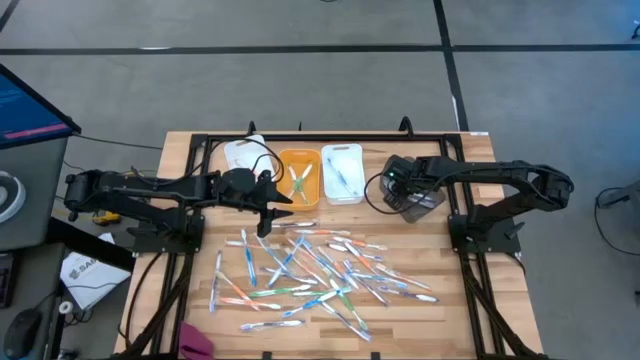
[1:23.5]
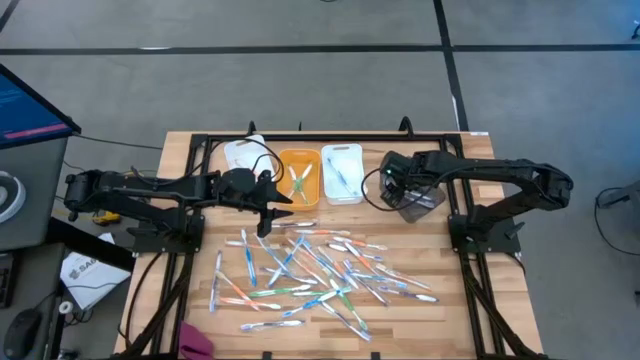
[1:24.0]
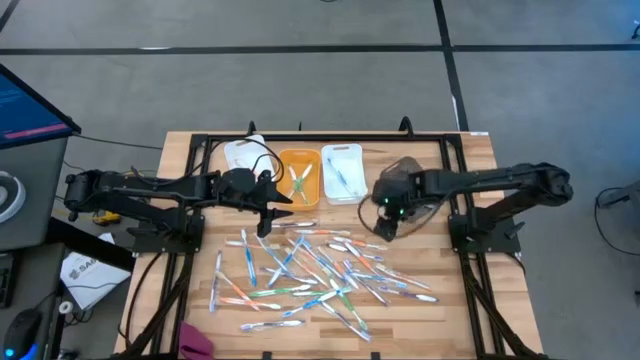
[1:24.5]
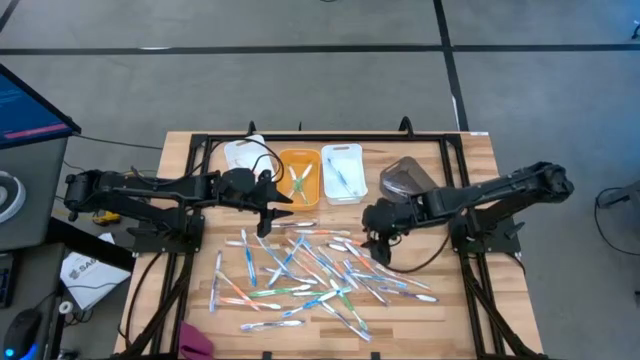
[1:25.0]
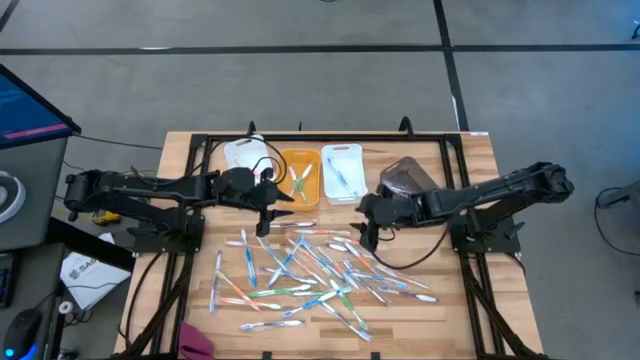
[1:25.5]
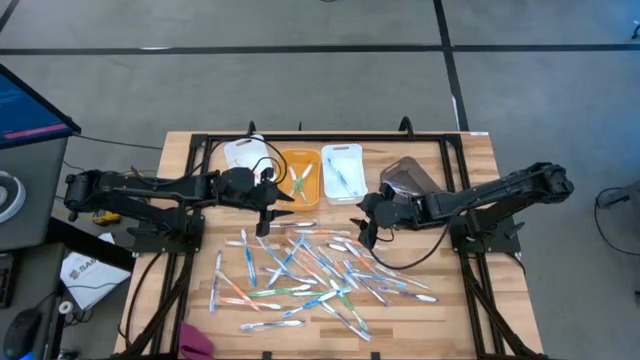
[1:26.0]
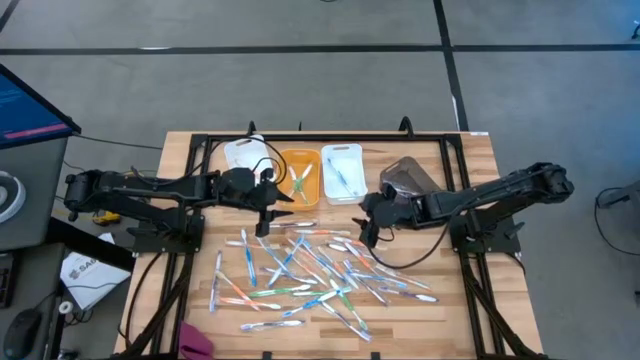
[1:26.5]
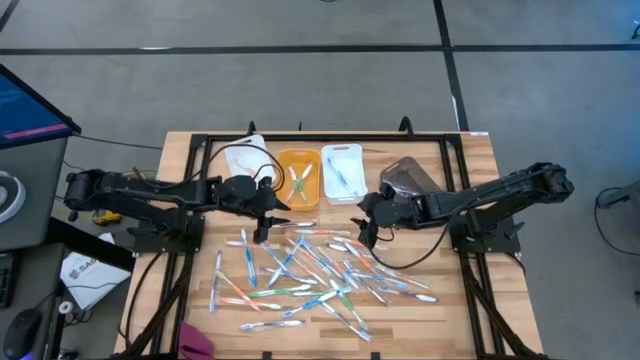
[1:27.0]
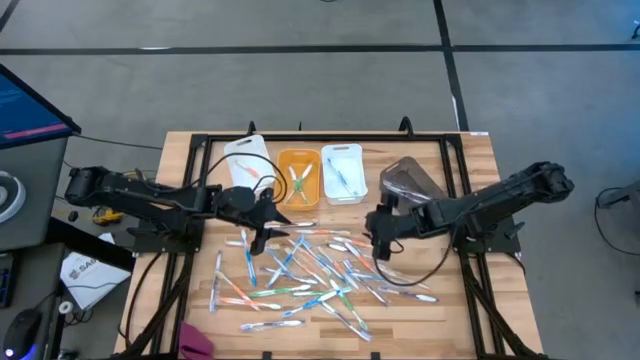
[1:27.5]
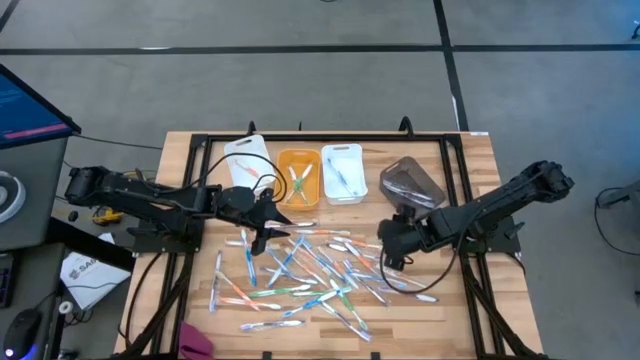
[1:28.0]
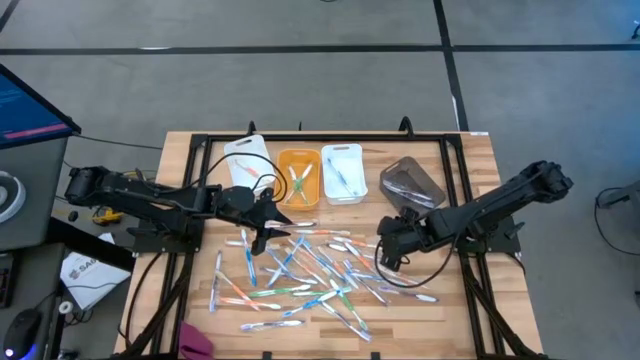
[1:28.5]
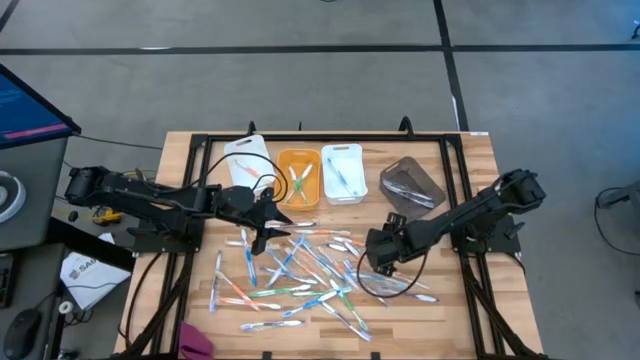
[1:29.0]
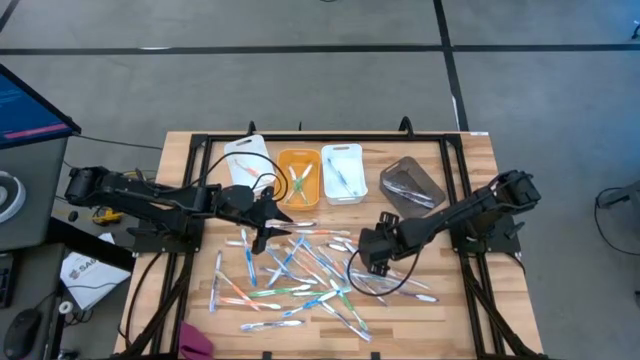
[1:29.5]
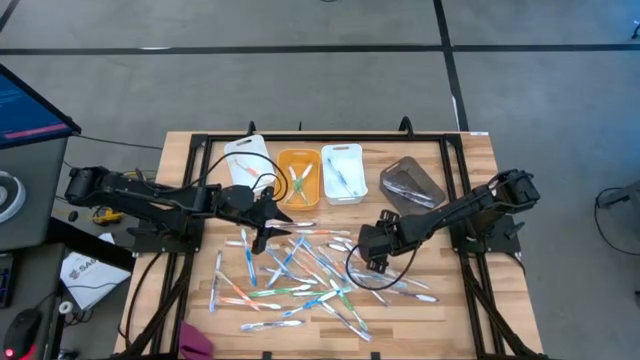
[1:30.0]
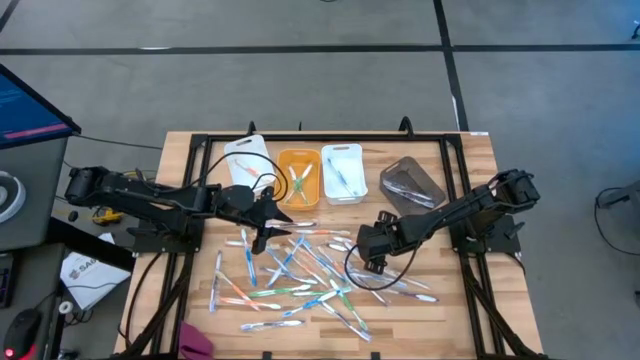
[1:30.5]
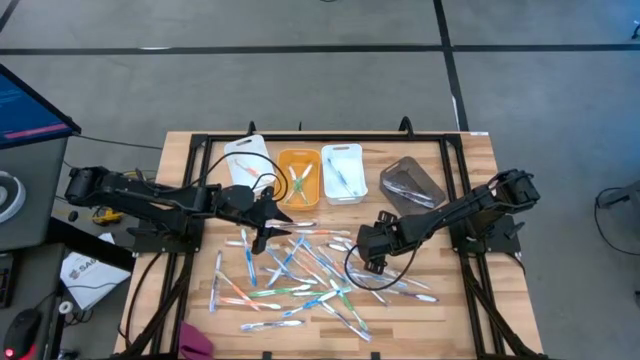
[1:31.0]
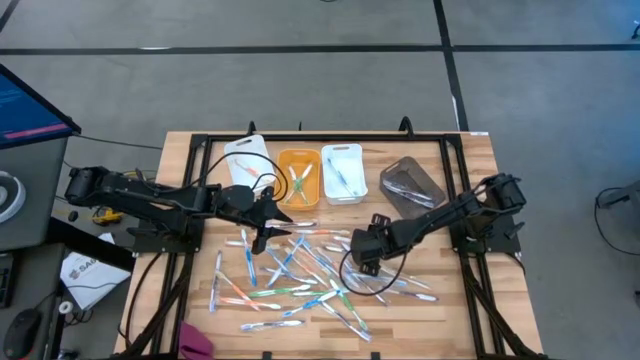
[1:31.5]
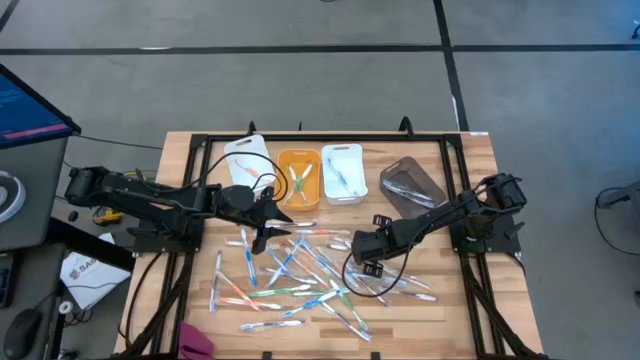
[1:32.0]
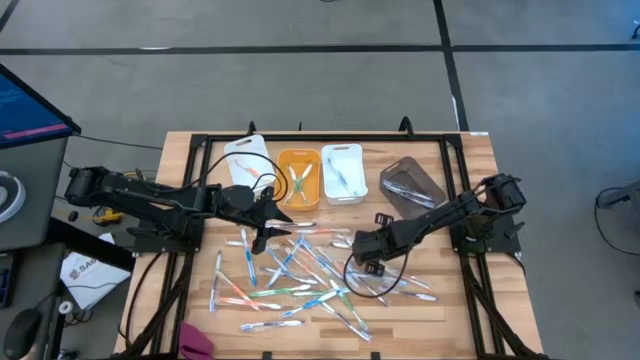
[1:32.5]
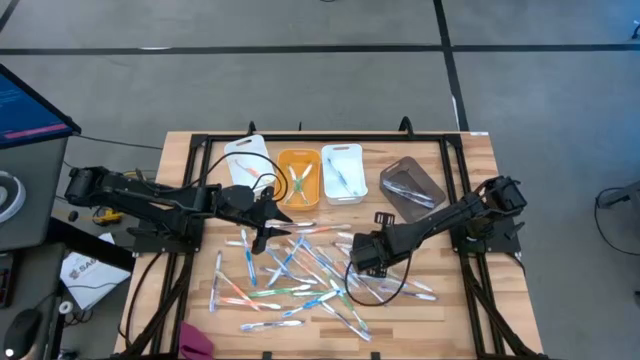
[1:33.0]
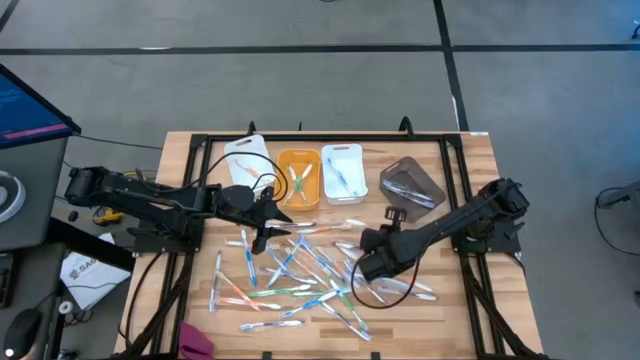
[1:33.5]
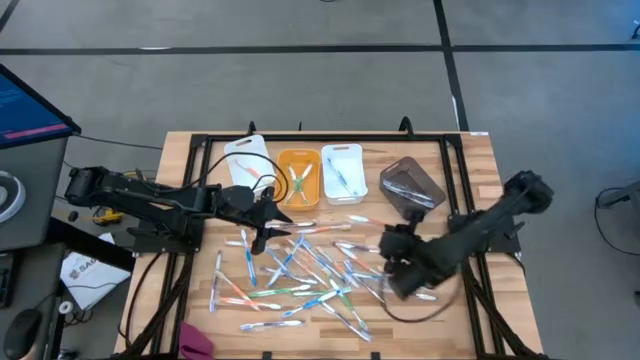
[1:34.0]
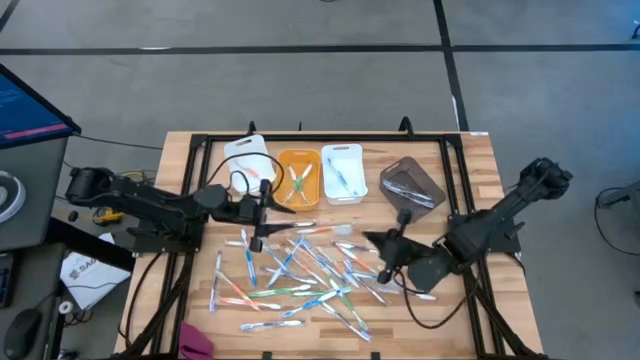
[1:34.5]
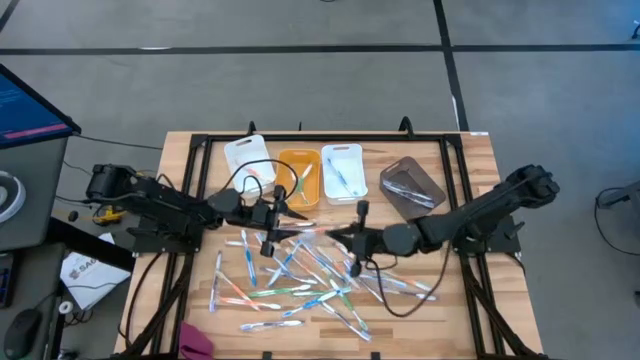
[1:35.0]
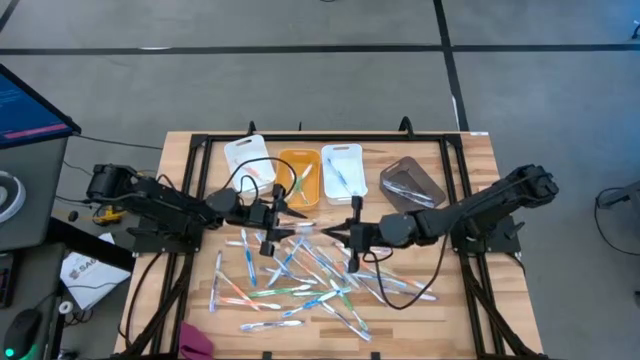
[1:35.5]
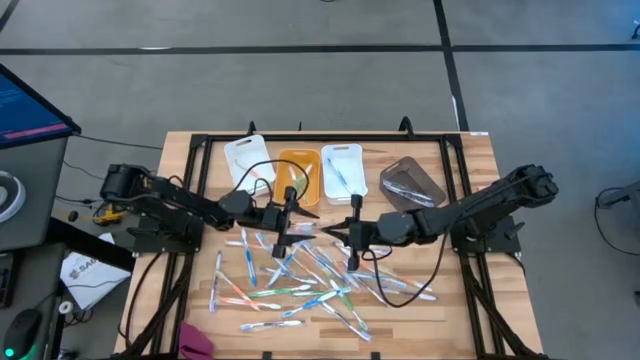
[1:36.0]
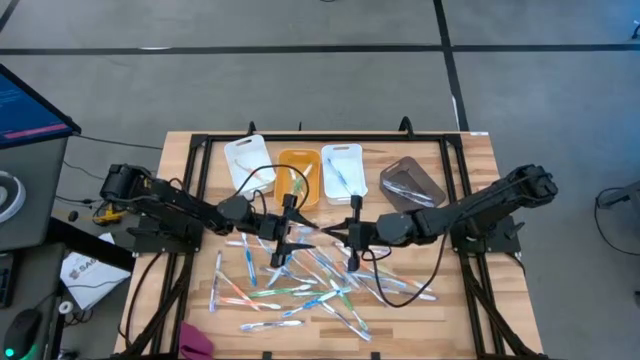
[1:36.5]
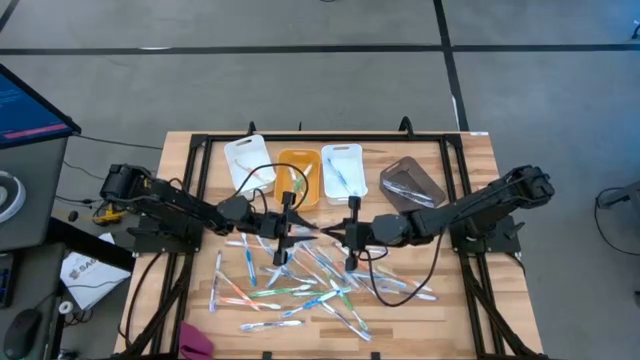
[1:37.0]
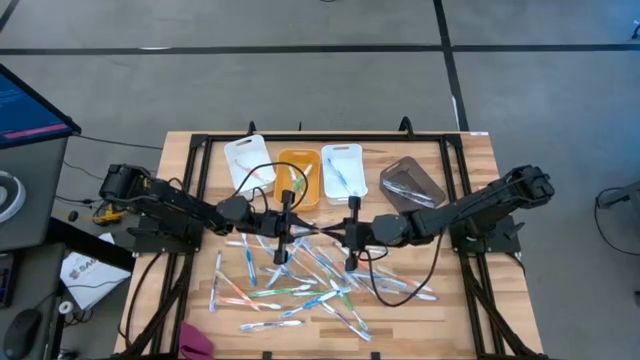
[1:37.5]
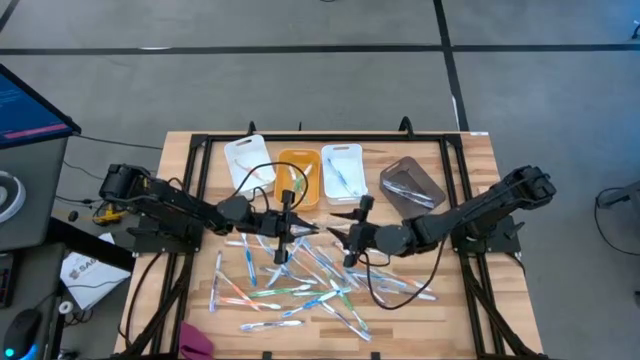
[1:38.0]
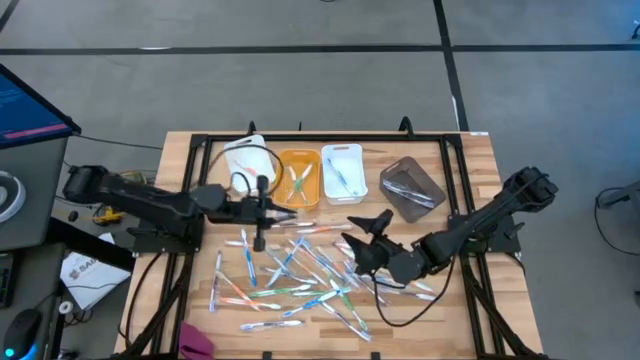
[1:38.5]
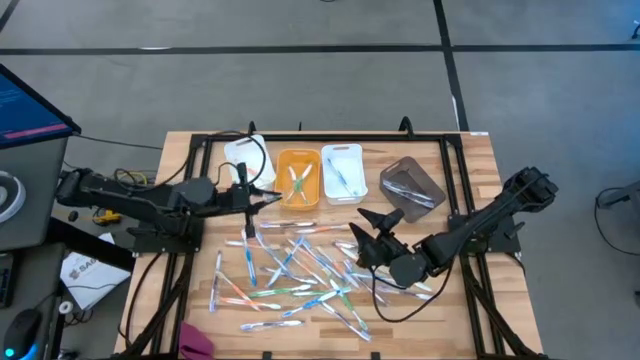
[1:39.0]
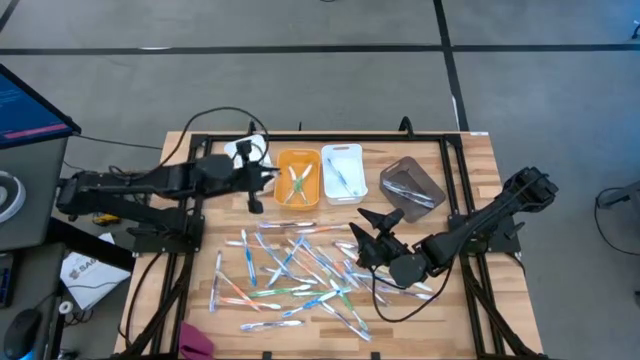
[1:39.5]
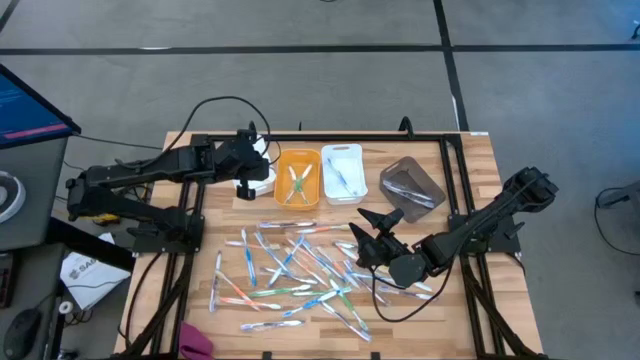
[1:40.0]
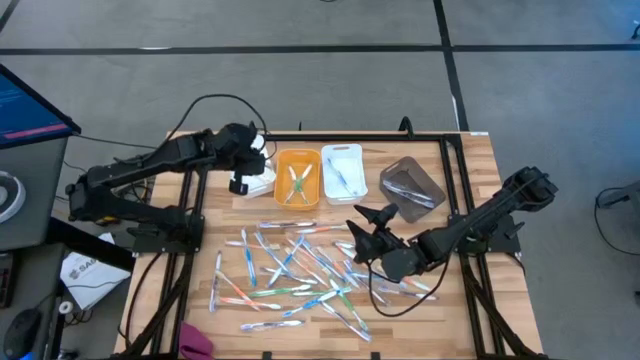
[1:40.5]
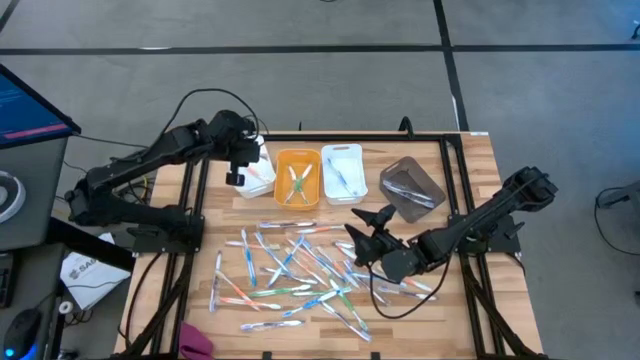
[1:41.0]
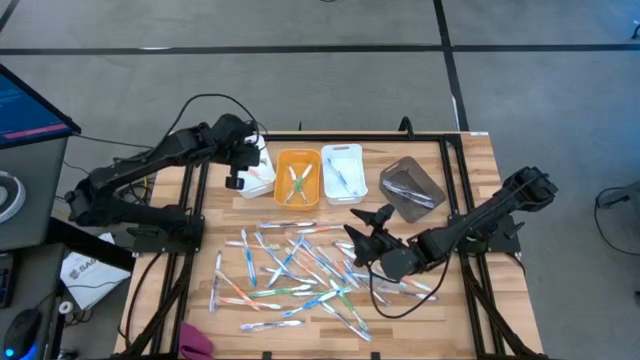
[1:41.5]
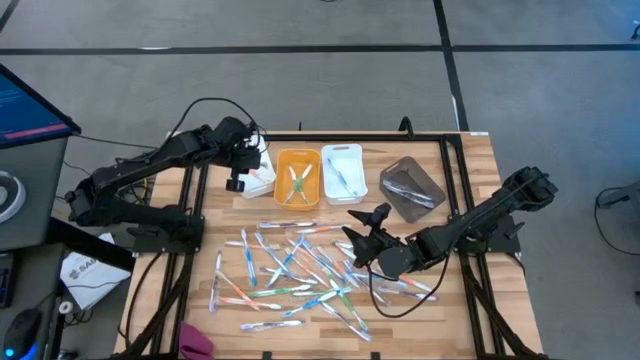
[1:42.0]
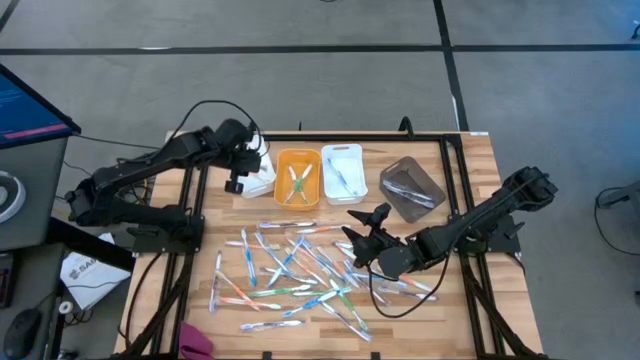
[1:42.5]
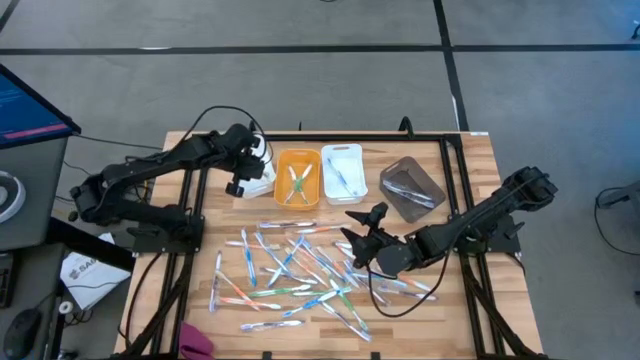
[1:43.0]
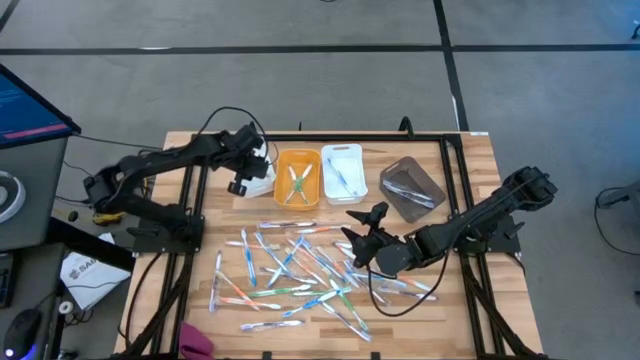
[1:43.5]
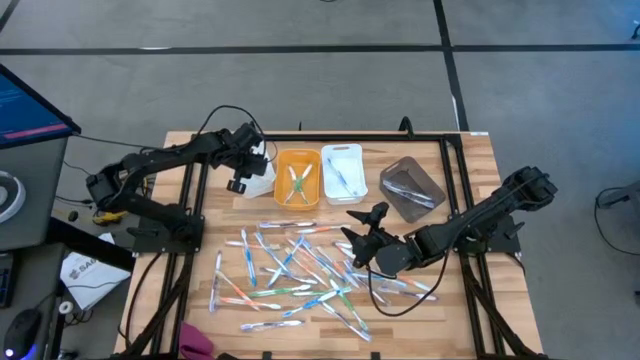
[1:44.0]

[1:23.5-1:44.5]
Task: Pick & Place Toothbrushes
Put the white orange toothbrush into the left white bin
